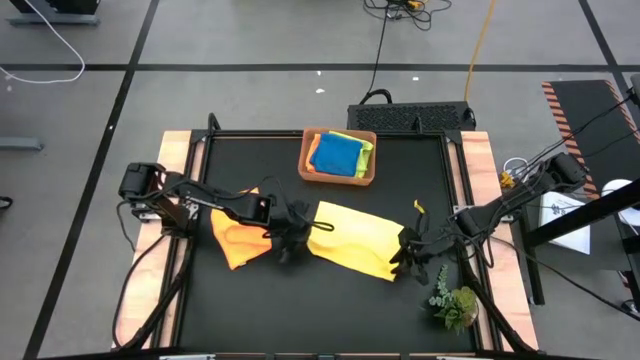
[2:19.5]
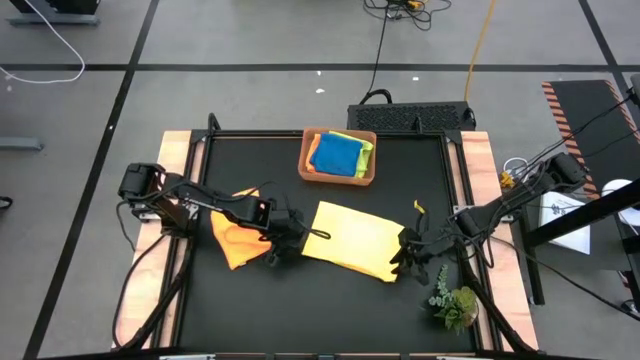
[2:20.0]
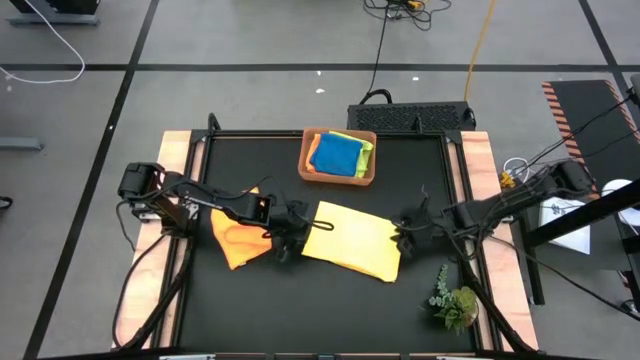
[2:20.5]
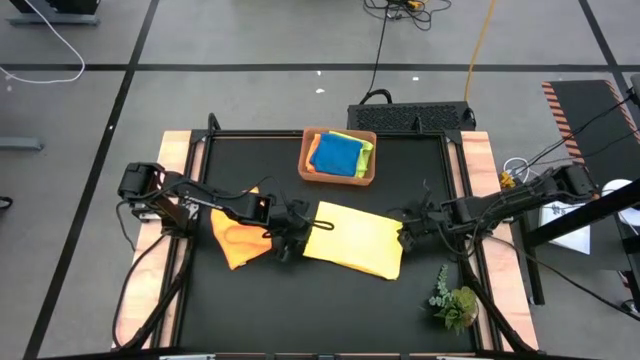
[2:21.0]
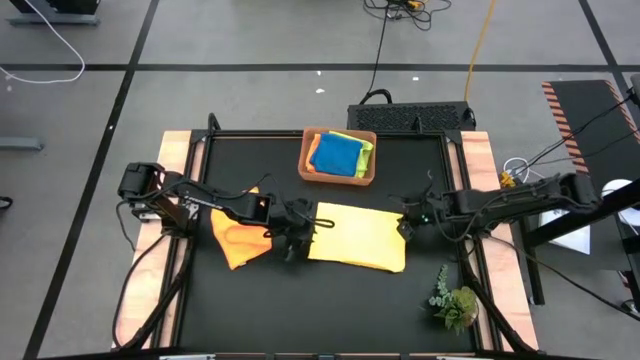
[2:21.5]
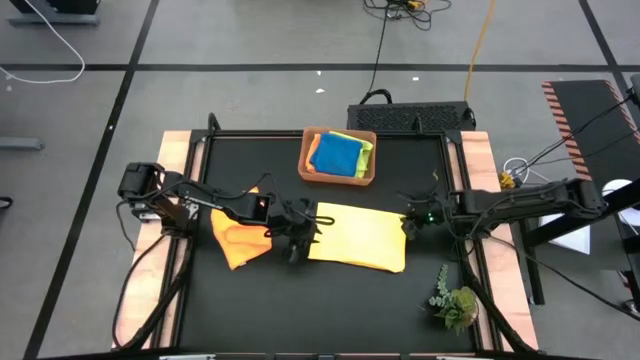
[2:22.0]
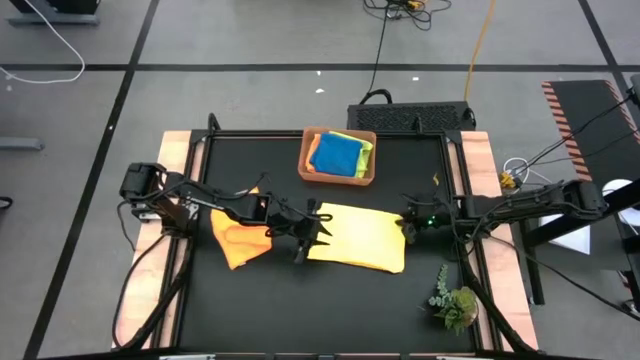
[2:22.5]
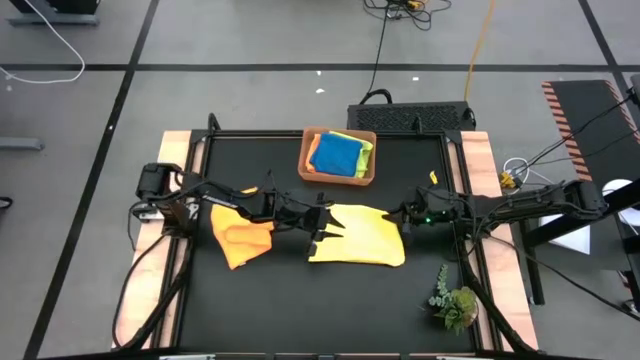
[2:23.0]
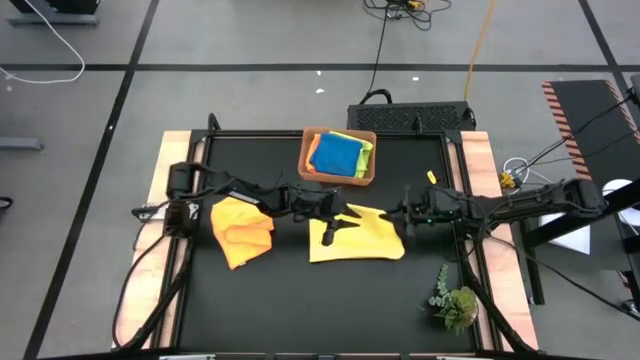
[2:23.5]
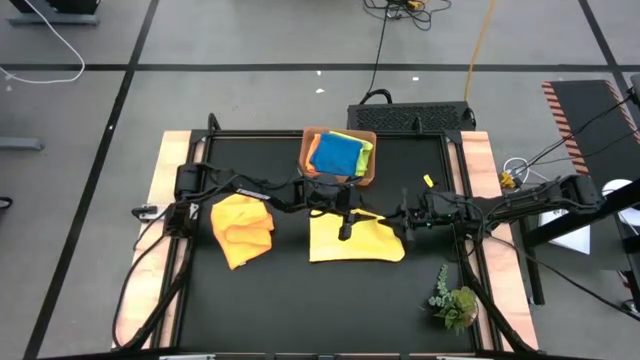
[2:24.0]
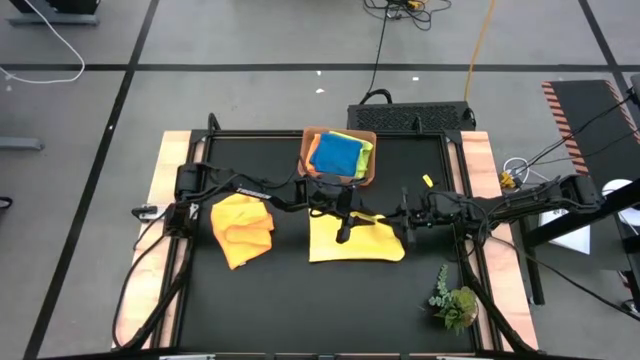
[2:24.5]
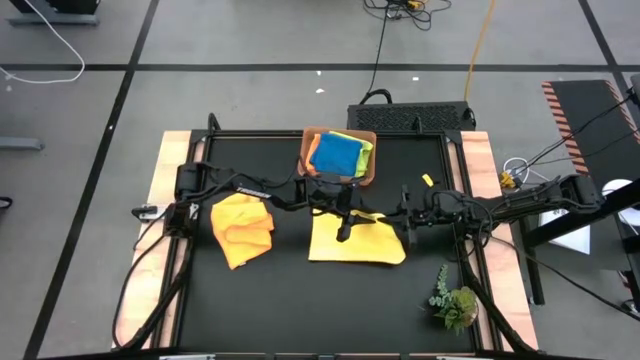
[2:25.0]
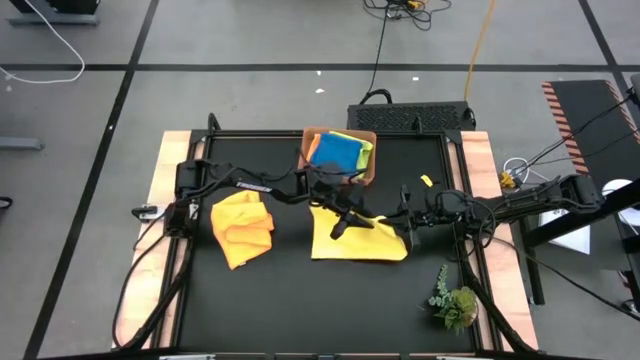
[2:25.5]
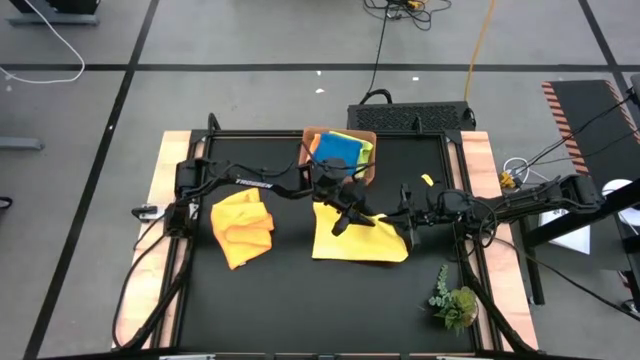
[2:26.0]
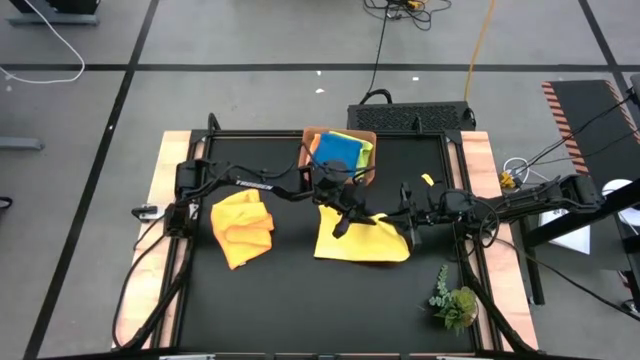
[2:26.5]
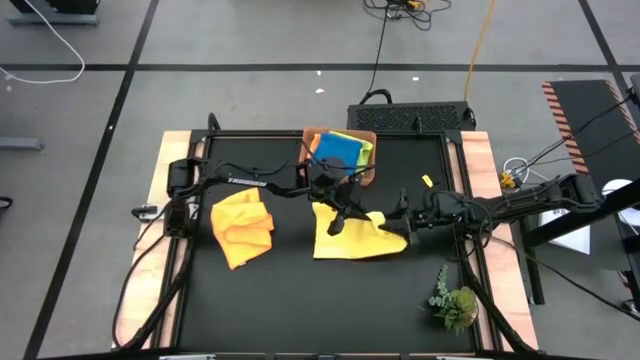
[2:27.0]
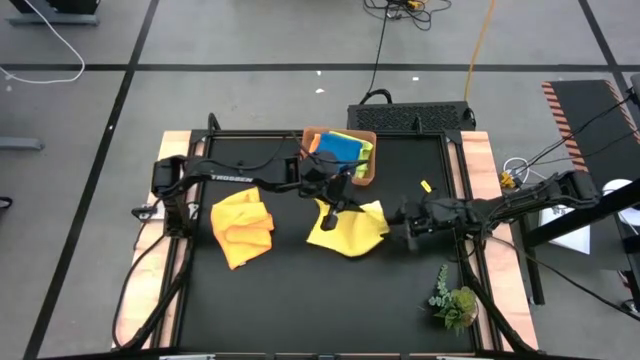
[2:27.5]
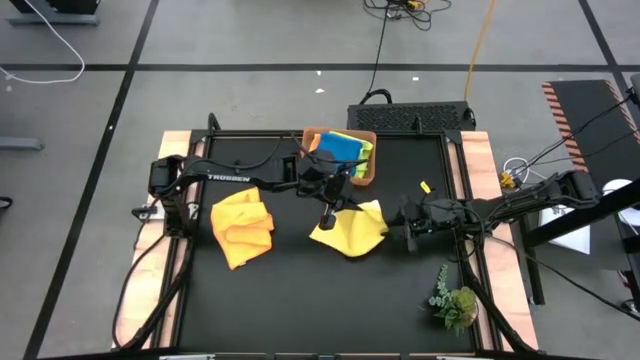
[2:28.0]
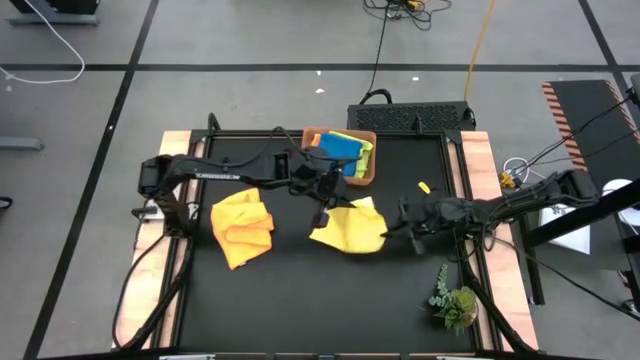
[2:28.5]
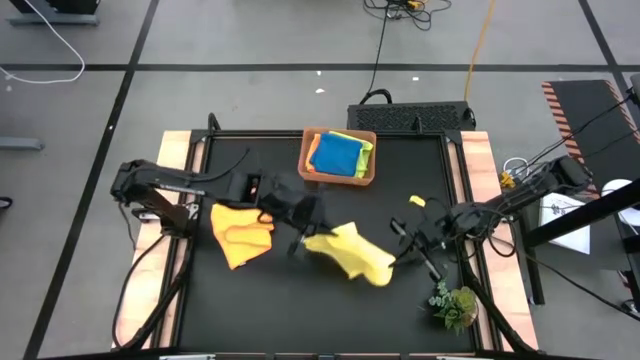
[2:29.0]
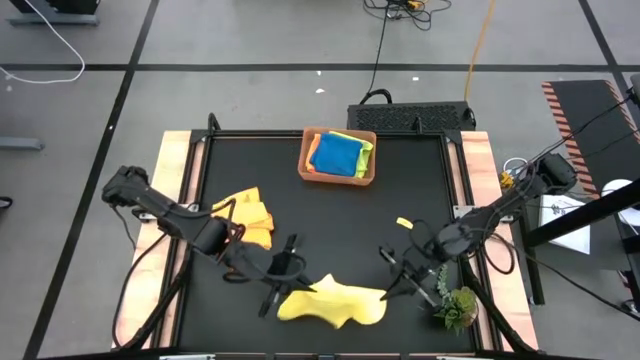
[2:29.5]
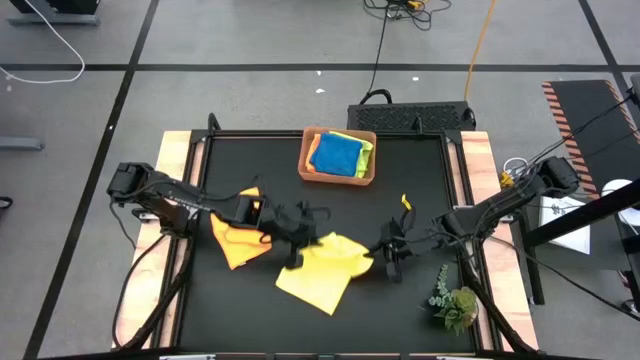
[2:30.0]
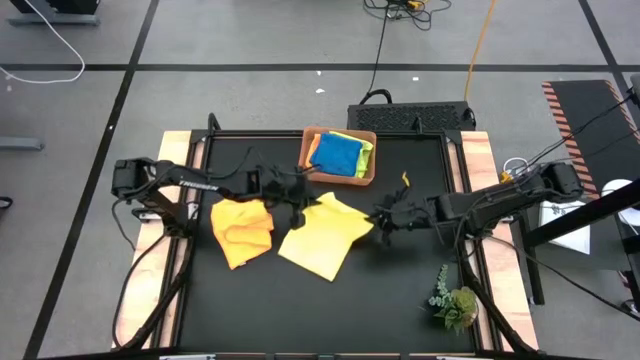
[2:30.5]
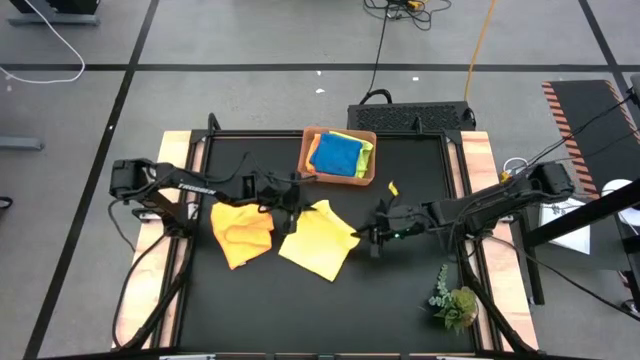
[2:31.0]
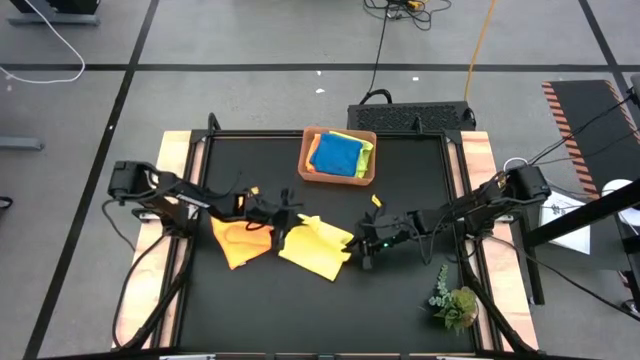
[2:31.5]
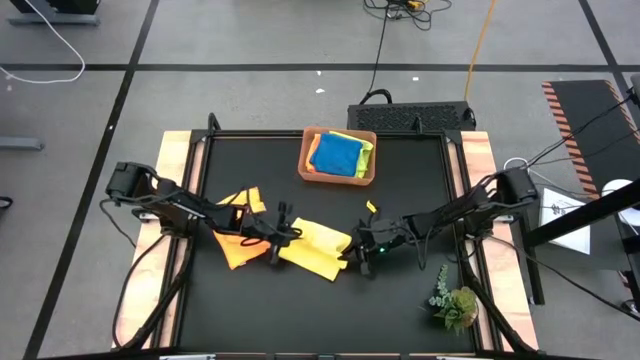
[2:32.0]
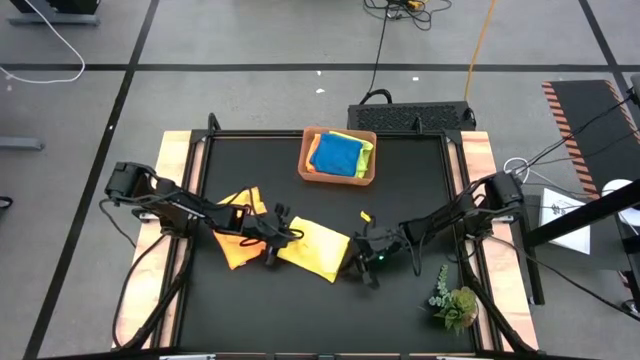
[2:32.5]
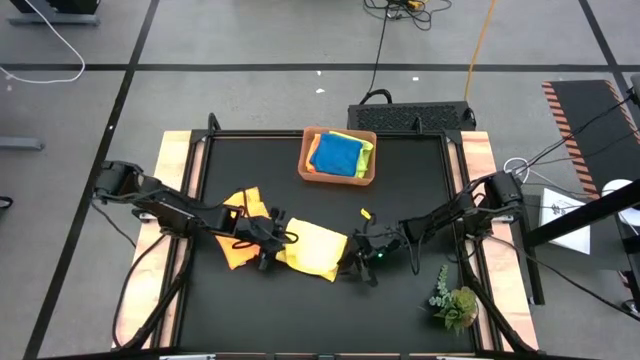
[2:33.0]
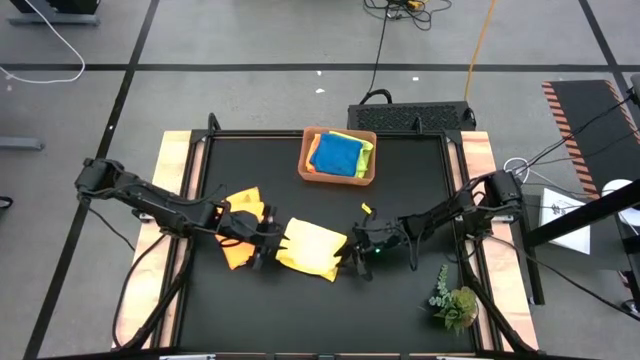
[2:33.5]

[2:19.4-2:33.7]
Task: Fold microfiber towels
Fold the yellow microfiber towel

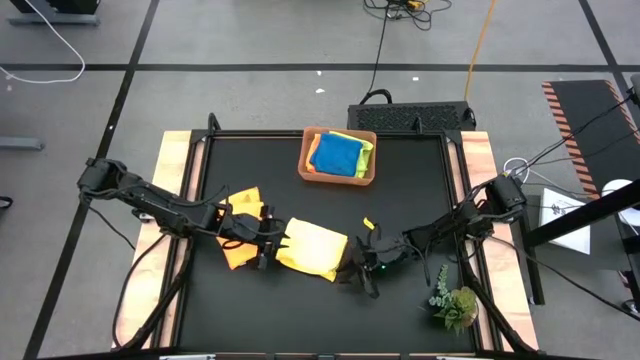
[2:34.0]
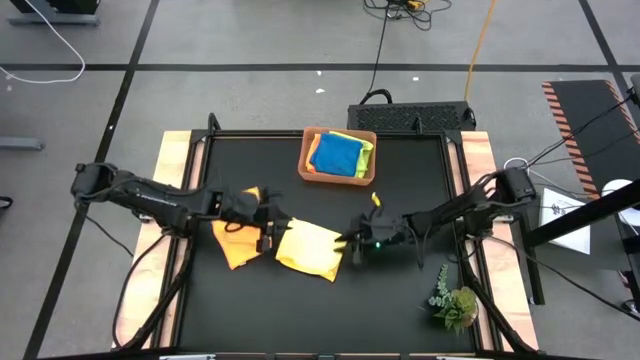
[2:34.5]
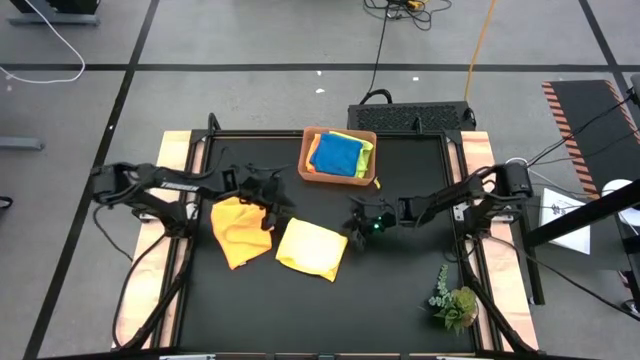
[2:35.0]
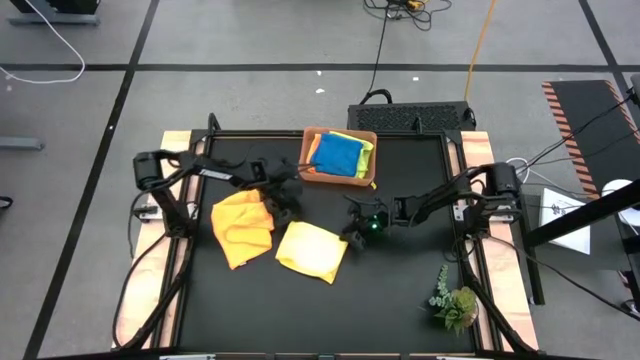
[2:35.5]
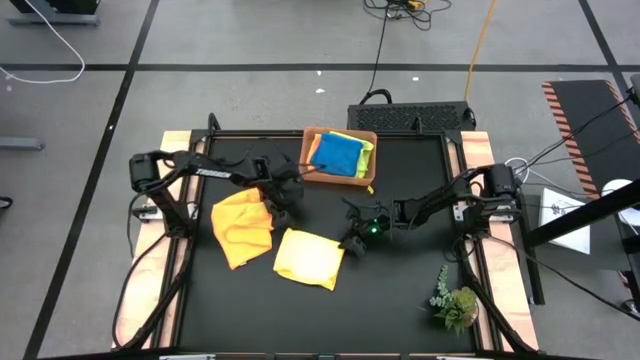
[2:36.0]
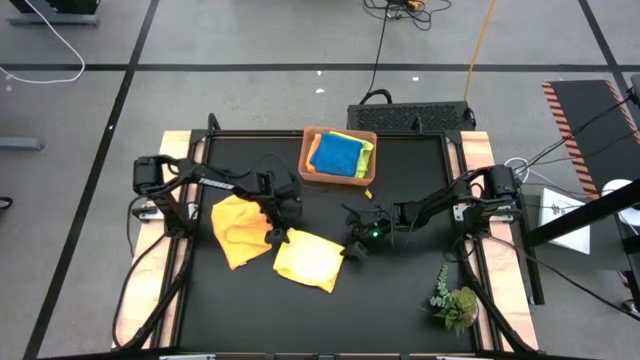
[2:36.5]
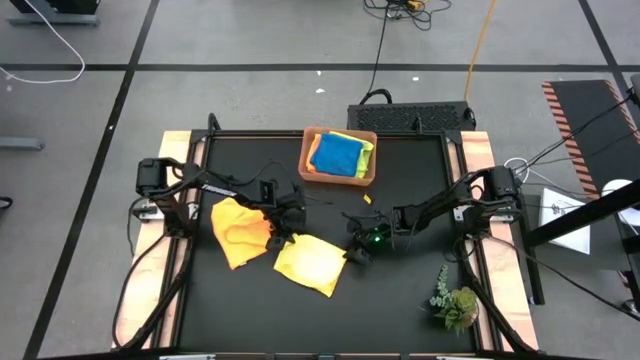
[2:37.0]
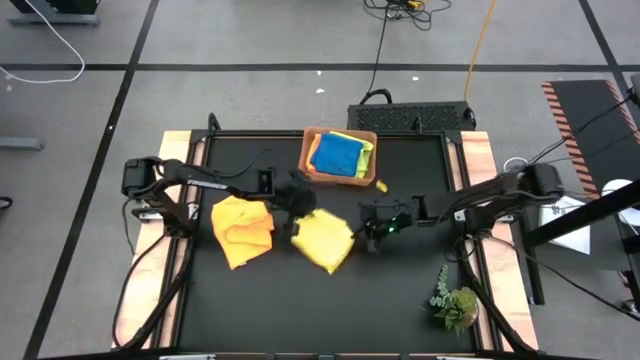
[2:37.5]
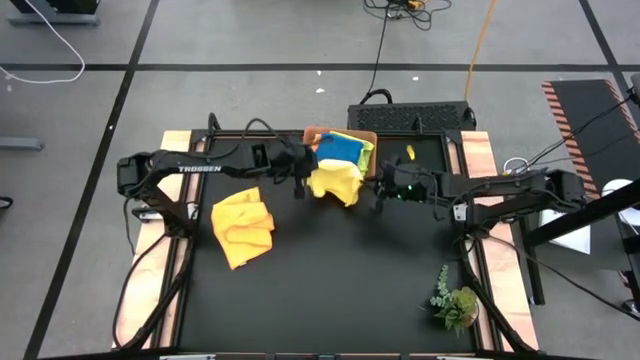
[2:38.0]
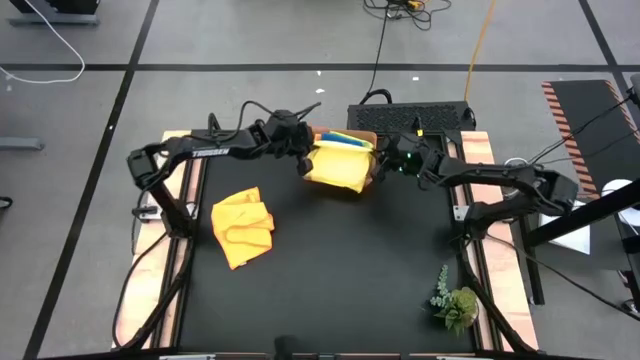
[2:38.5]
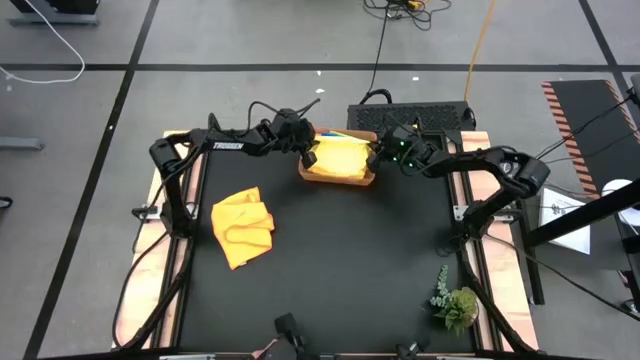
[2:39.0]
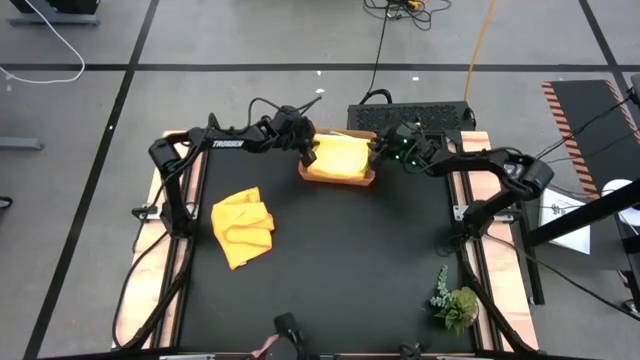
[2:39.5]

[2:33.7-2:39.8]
Put the yellow microfiber towel into the orange bin
